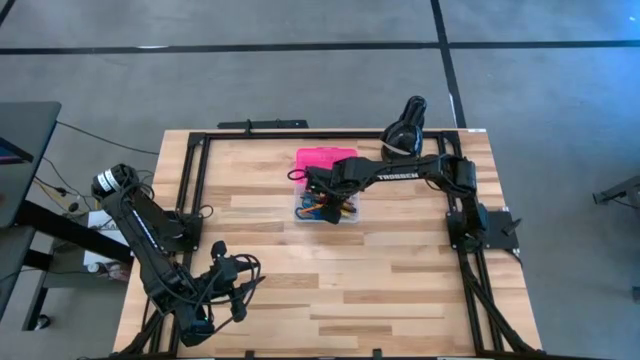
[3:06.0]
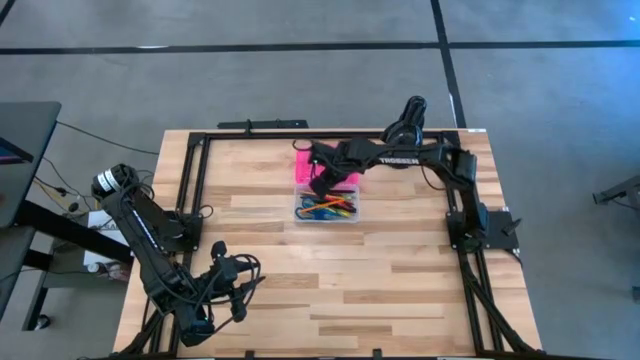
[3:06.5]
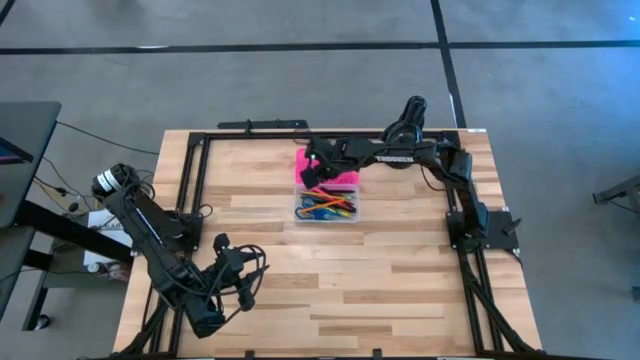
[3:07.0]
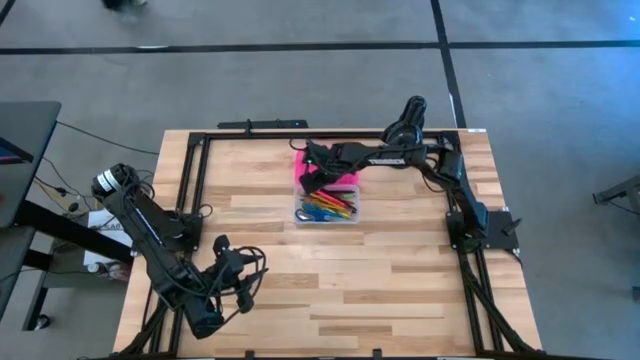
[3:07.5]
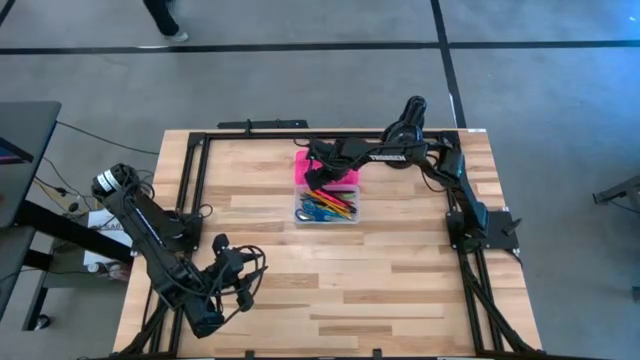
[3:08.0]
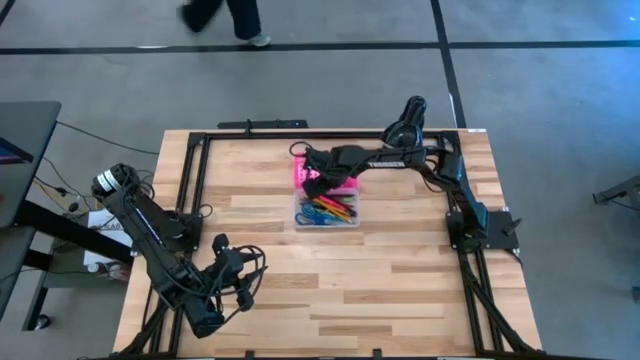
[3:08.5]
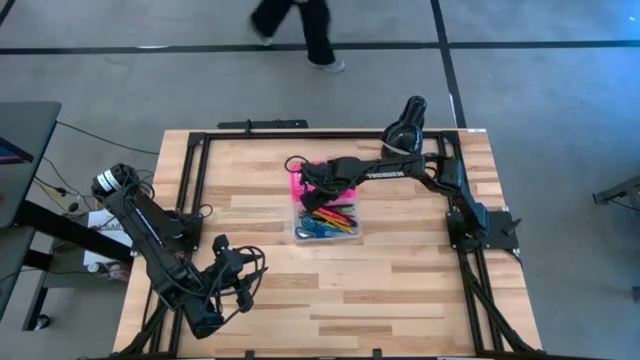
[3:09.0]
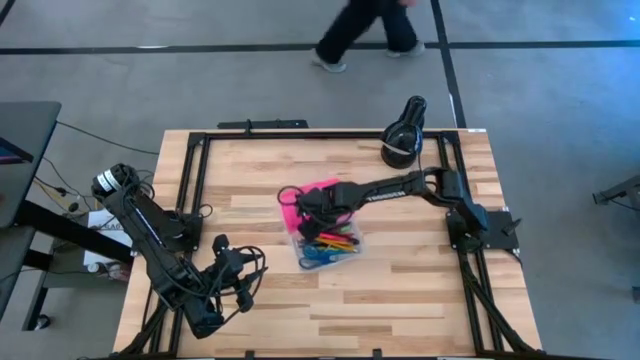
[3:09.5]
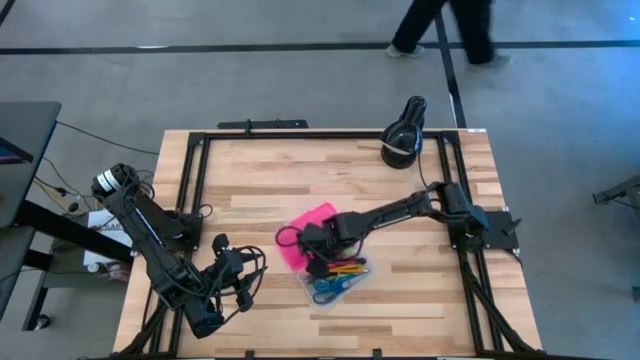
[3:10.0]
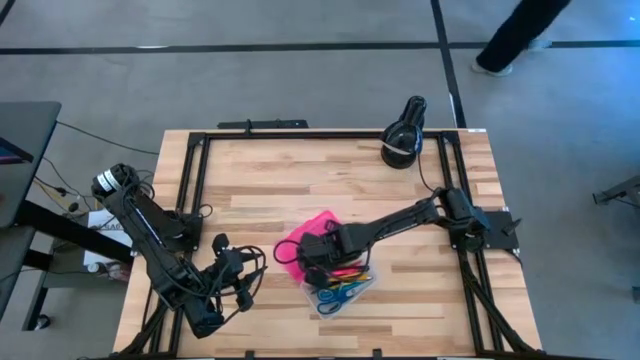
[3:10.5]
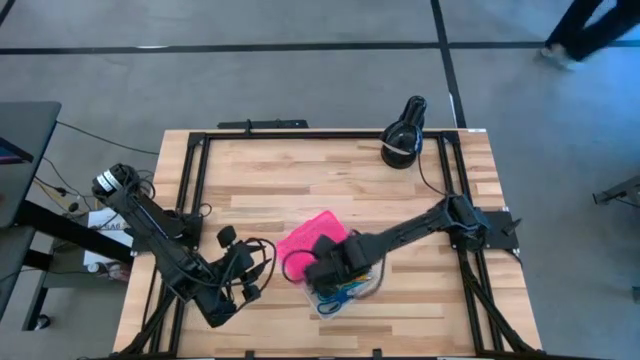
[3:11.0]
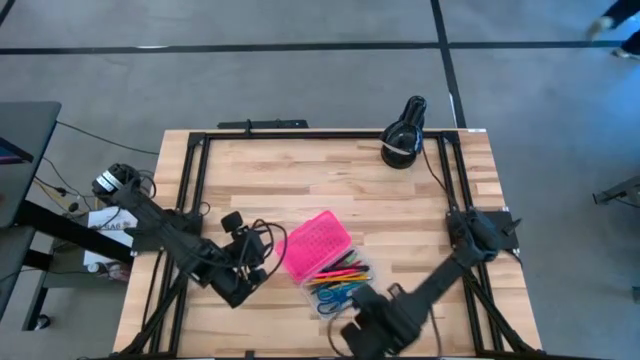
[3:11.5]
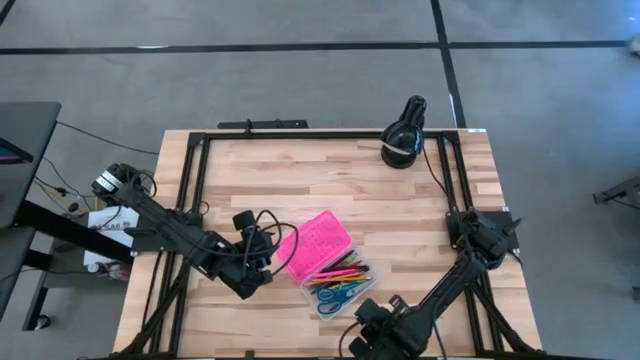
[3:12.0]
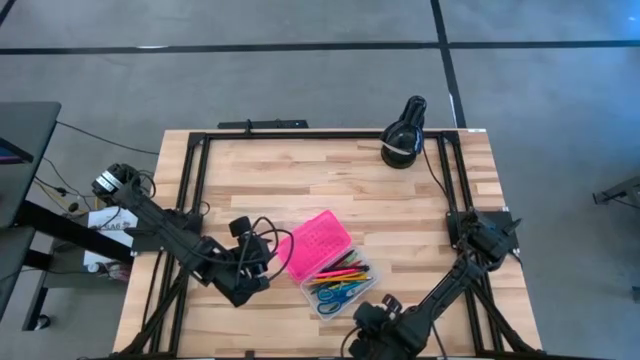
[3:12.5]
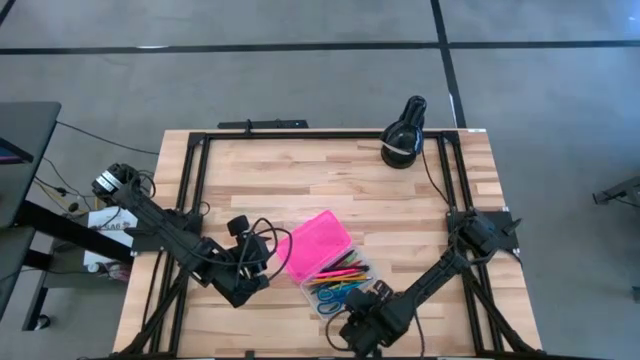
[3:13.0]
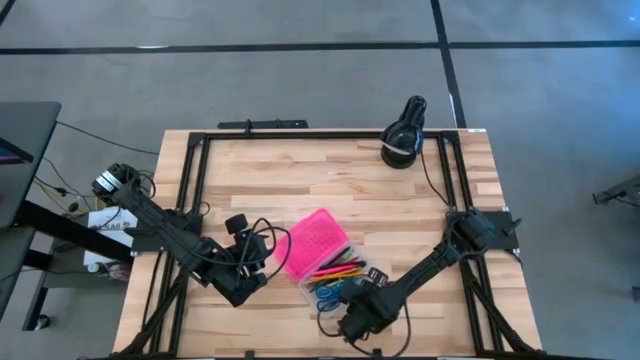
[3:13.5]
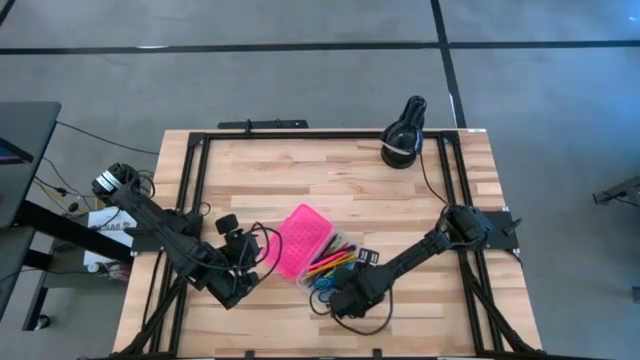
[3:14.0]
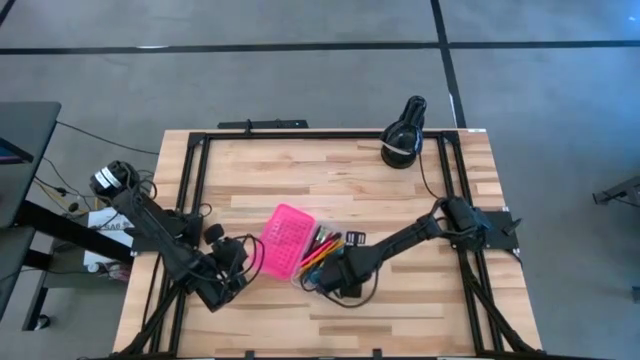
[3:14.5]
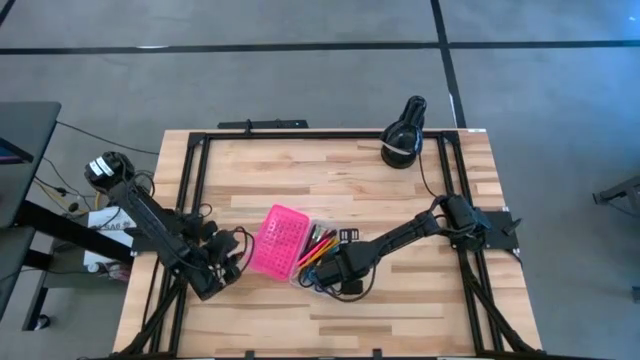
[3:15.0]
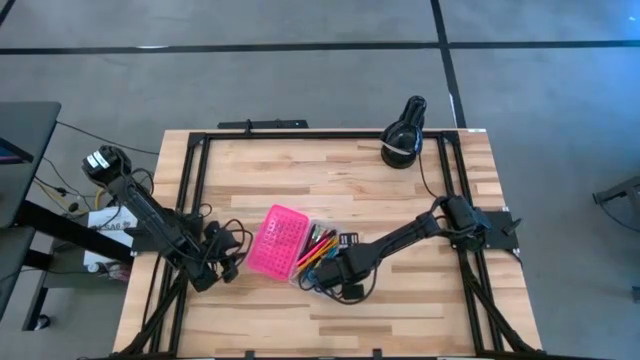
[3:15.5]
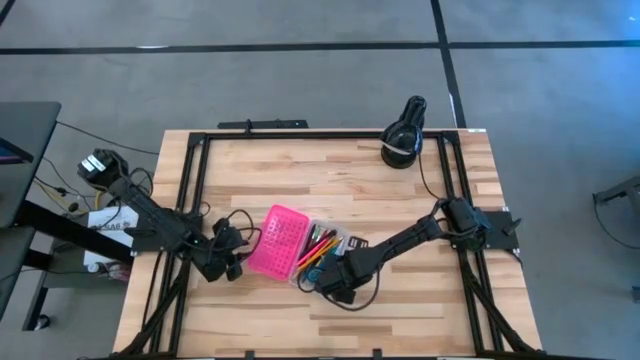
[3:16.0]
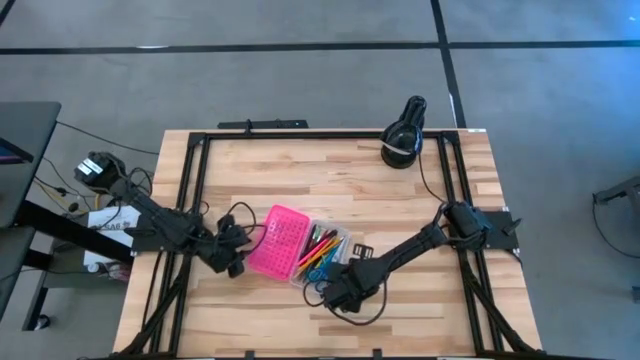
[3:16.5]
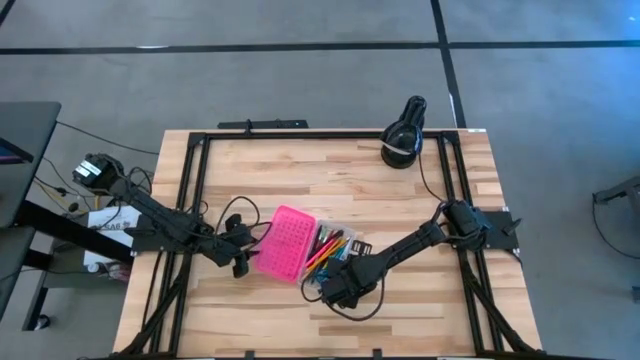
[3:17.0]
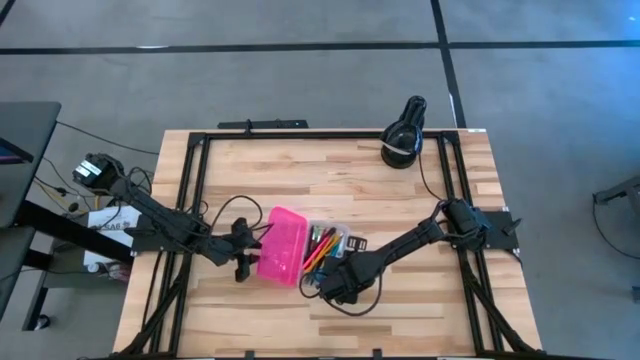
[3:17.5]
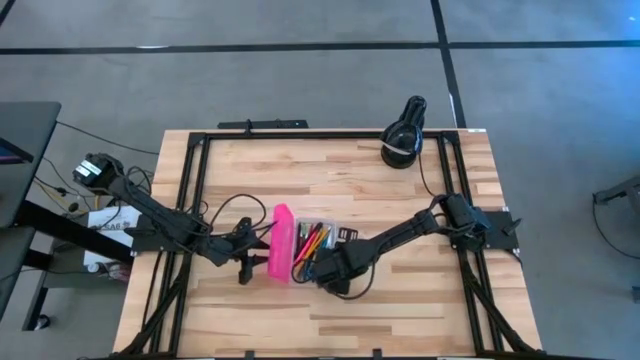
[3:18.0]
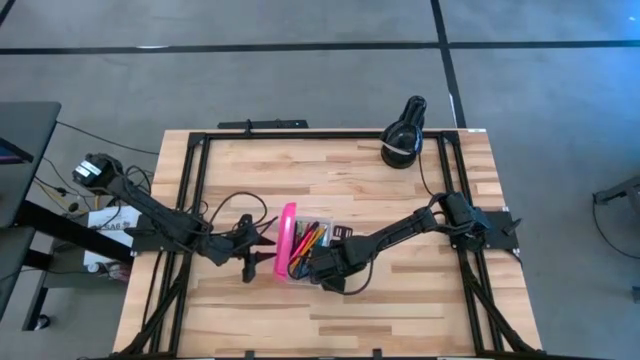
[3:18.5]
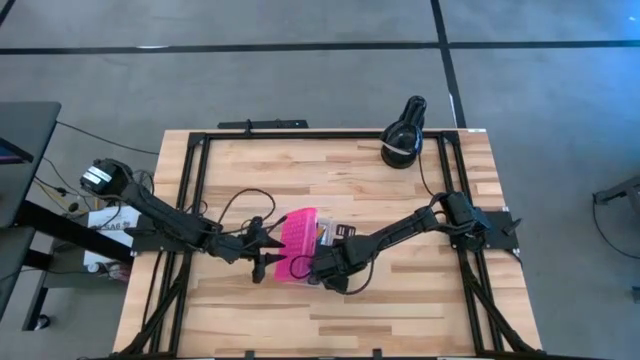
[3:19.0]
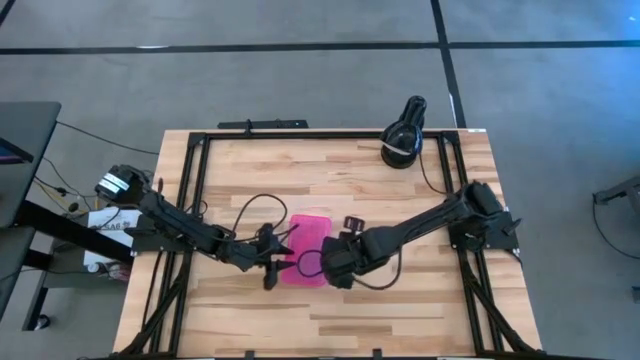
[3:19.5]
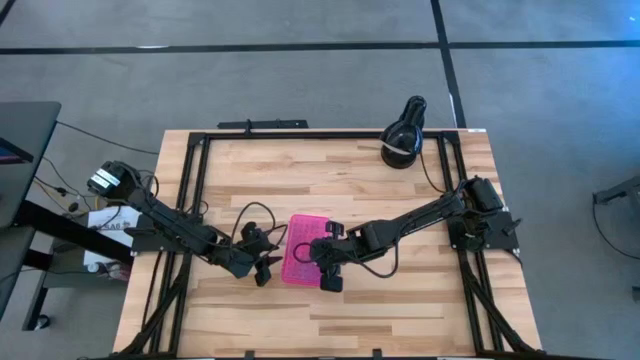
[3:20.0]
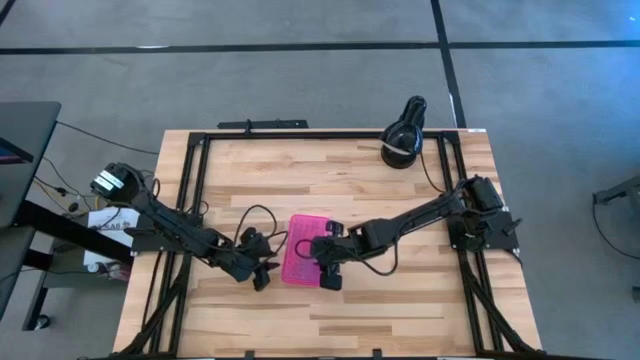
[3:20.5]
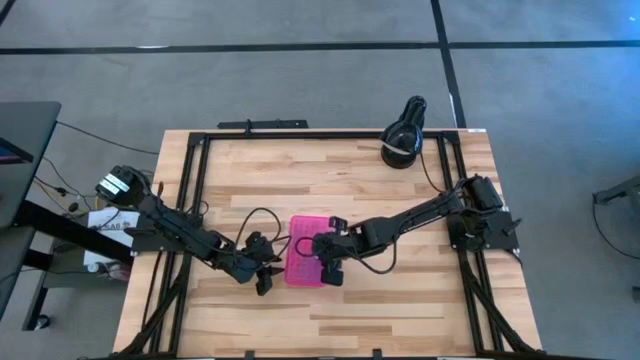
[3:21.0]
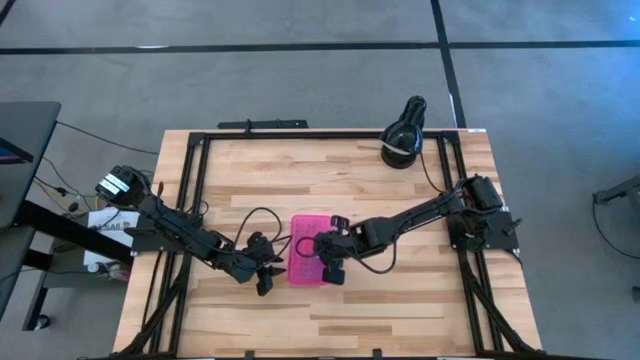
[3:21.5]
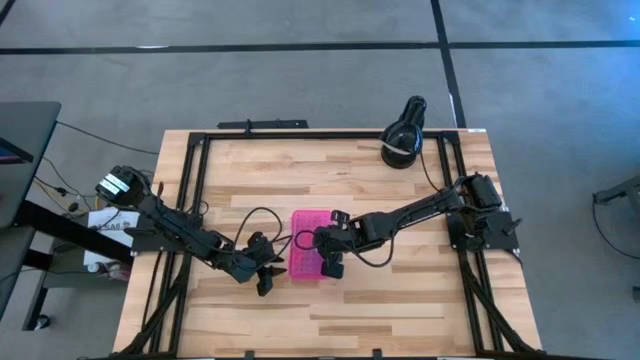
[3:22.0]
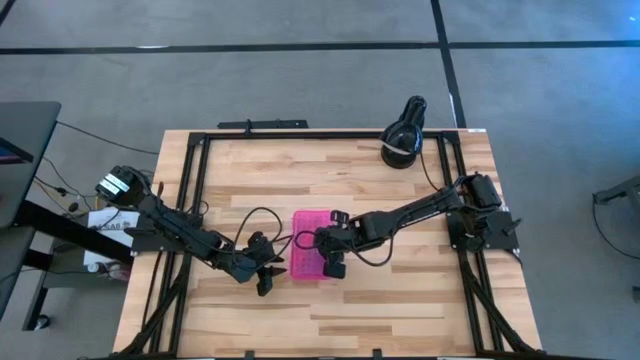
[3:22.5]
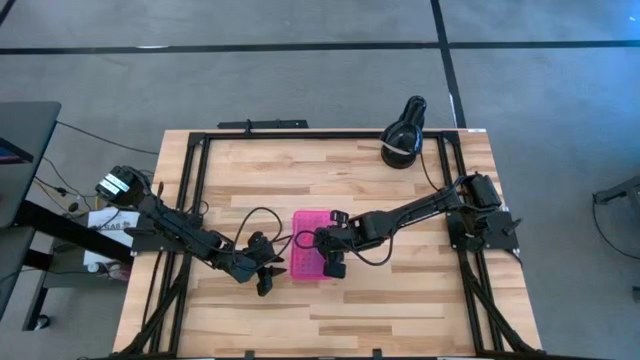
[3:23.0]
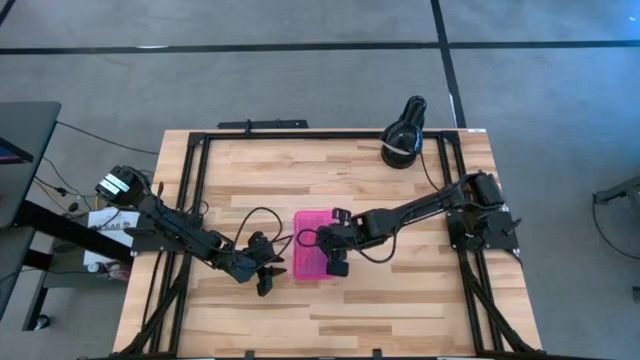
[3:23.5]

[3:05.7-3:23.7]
Task: Pick & place school supplies into a supply box
Close the pink supply box

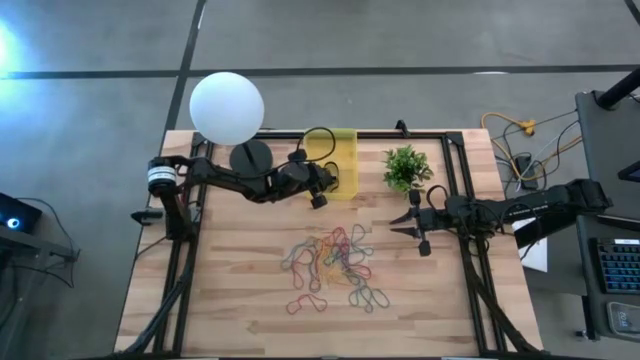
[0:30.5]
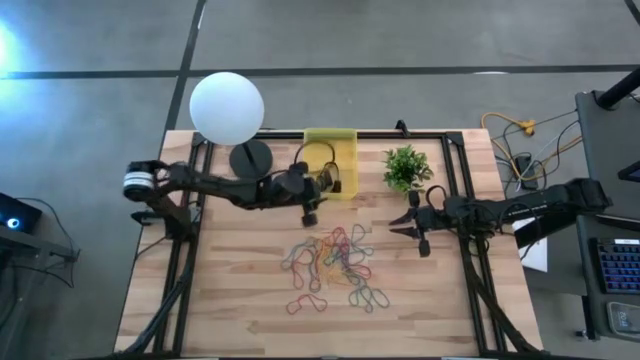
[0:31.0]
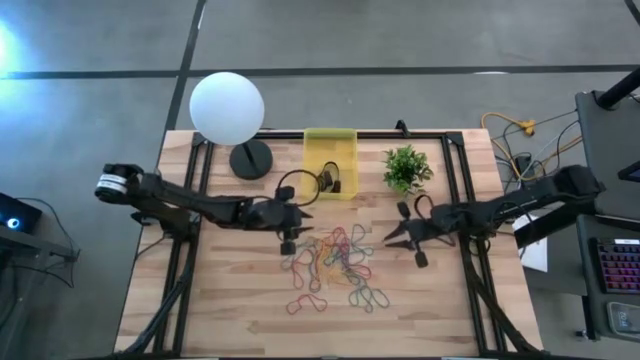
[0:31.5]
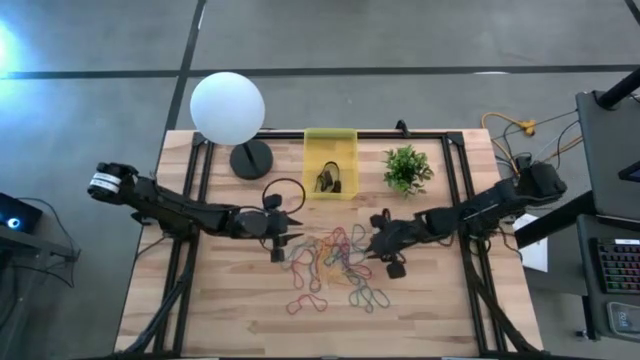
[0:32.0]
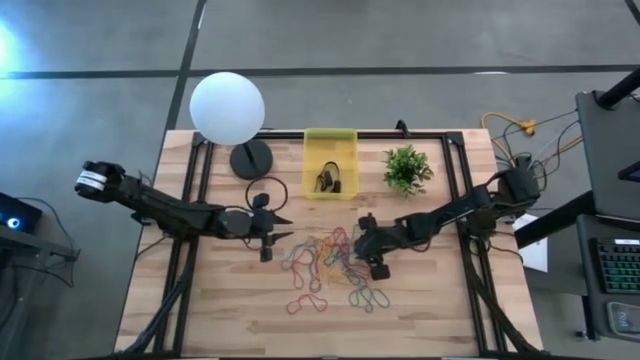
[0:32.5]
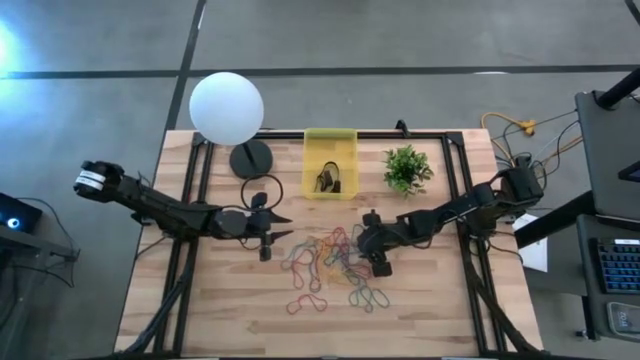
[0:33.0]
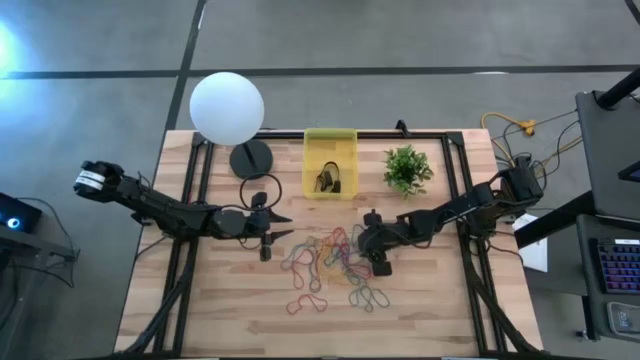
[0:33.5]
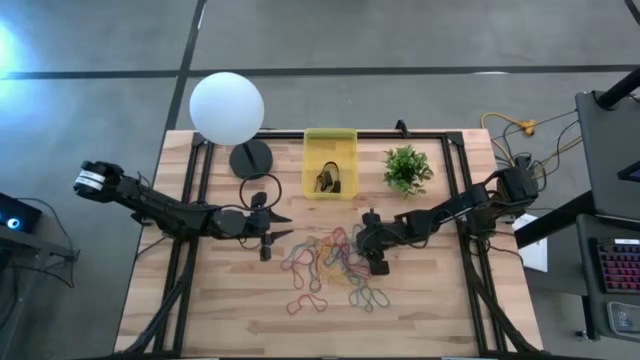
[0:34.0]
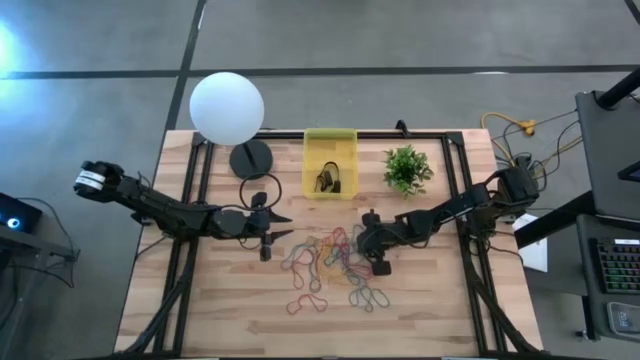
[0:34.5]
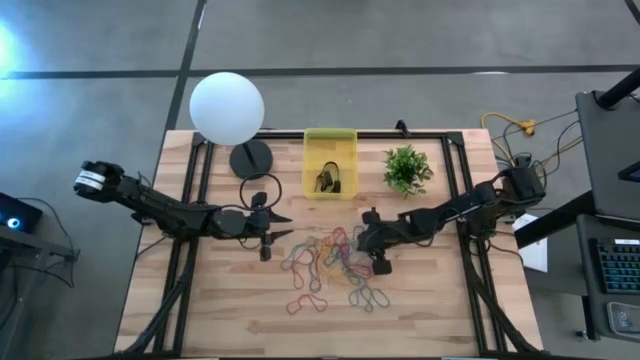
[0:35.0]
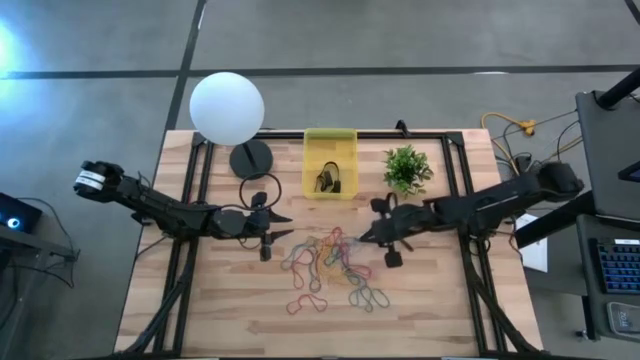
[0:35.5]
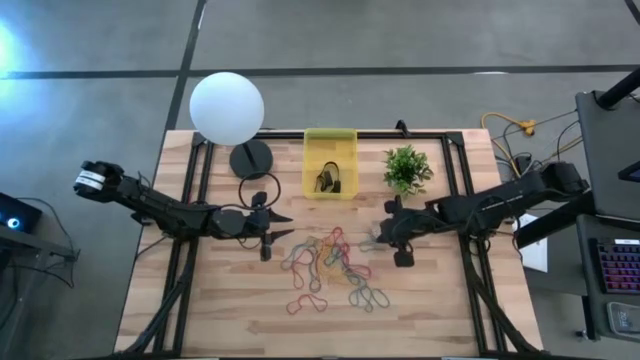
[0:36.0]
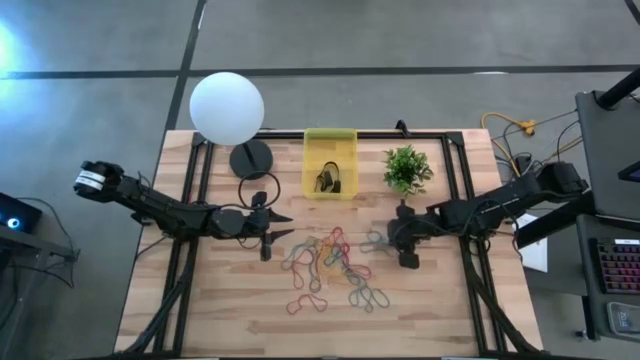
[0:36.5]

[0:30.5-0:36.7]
Task: Pick and place rubber bands into bin
Put the blue rubber band into the yellow bin
